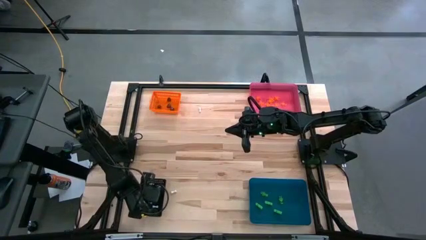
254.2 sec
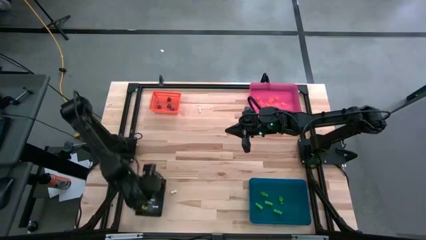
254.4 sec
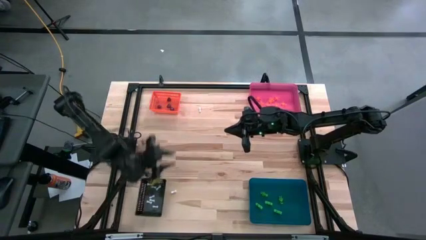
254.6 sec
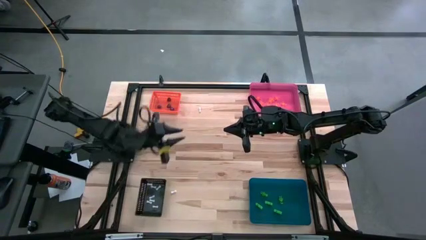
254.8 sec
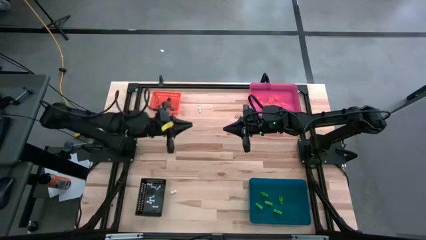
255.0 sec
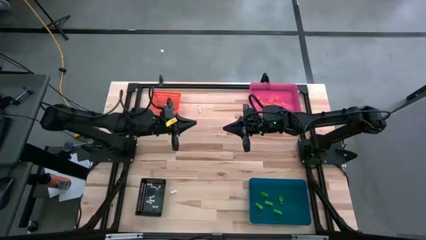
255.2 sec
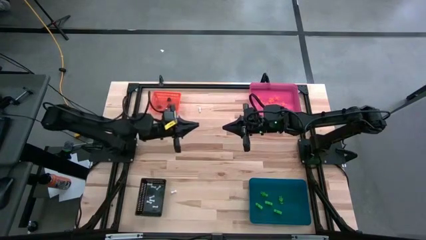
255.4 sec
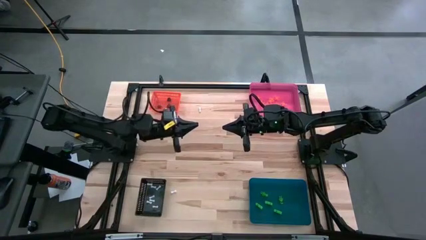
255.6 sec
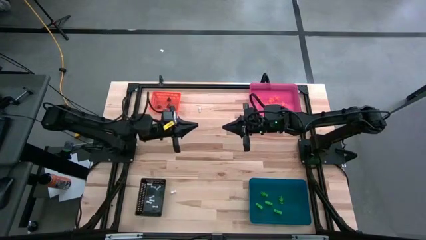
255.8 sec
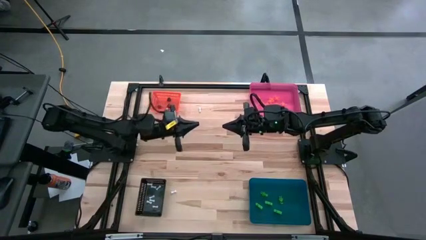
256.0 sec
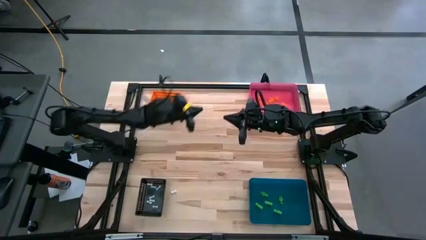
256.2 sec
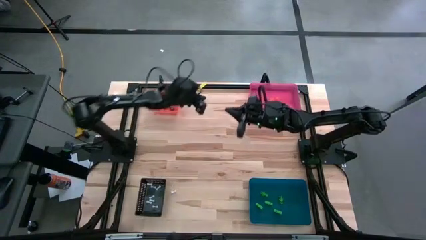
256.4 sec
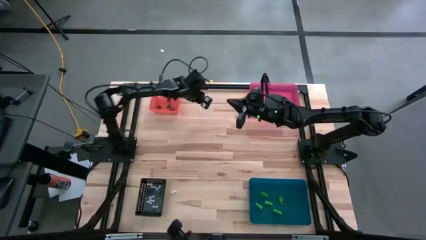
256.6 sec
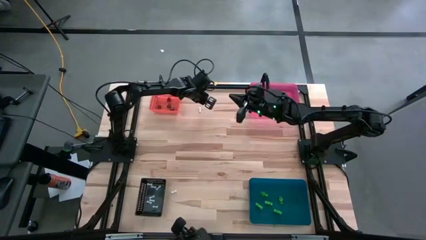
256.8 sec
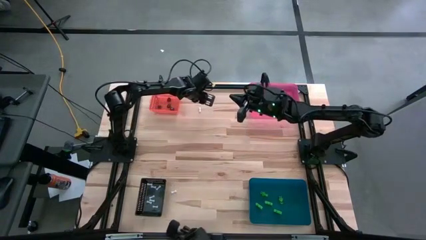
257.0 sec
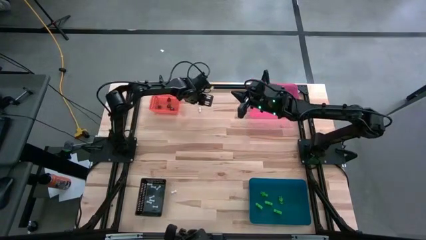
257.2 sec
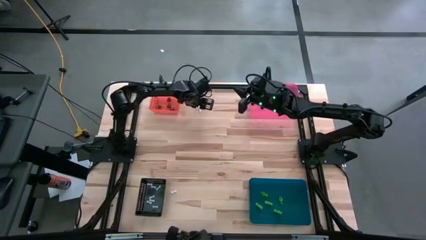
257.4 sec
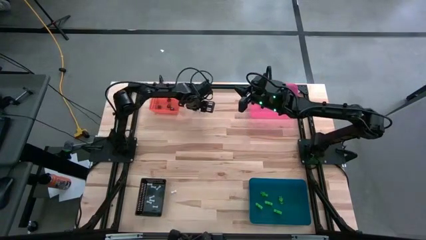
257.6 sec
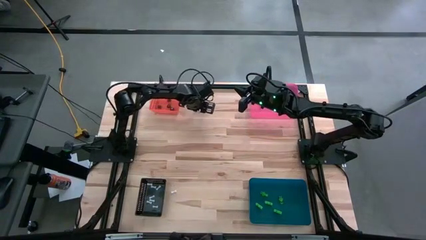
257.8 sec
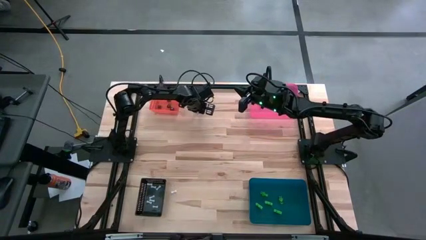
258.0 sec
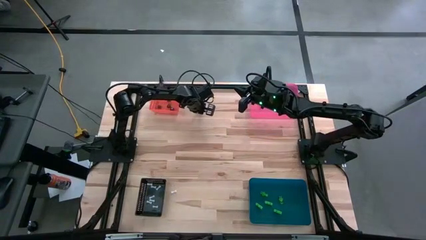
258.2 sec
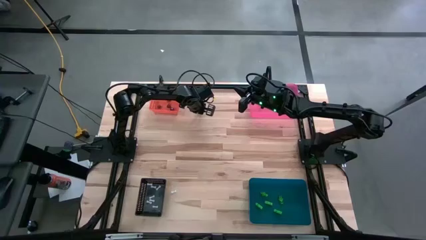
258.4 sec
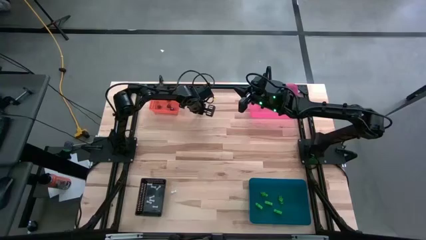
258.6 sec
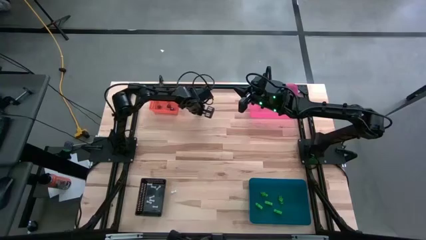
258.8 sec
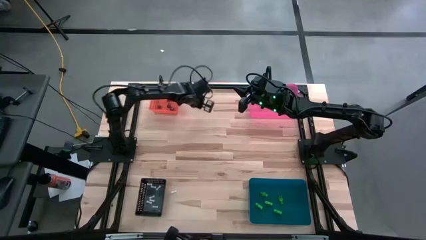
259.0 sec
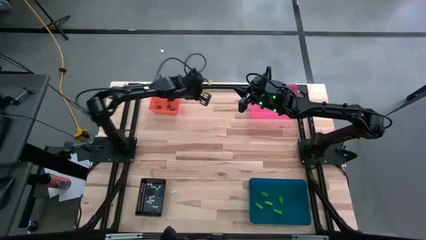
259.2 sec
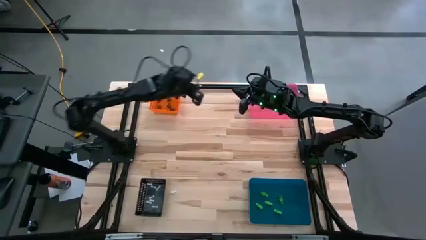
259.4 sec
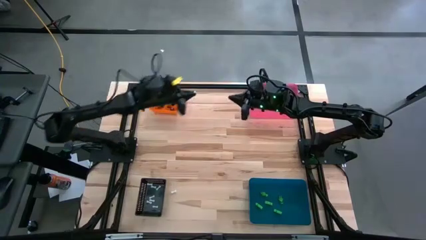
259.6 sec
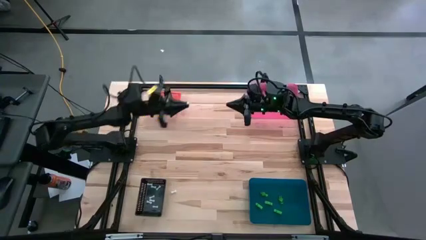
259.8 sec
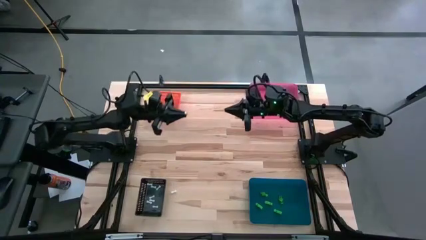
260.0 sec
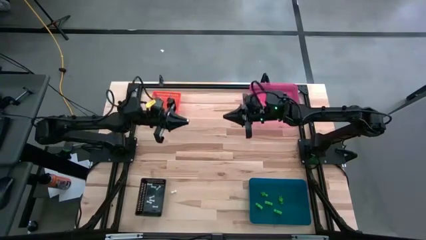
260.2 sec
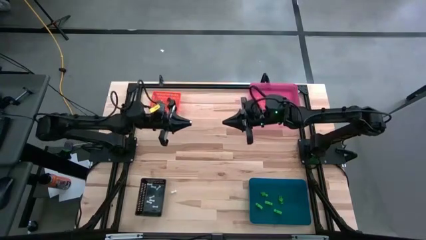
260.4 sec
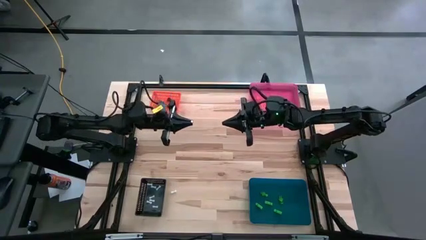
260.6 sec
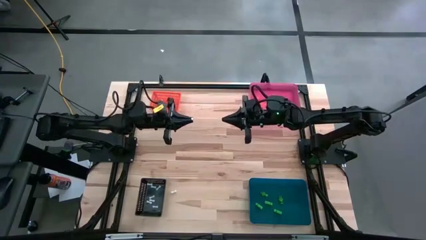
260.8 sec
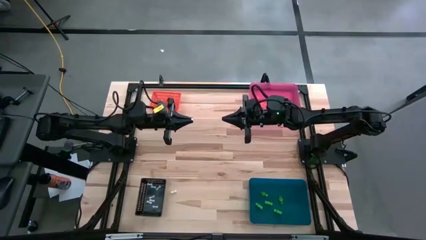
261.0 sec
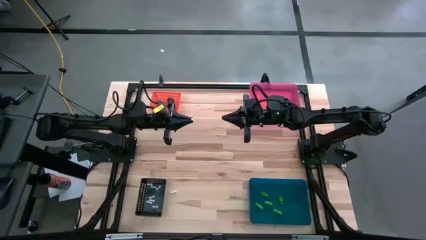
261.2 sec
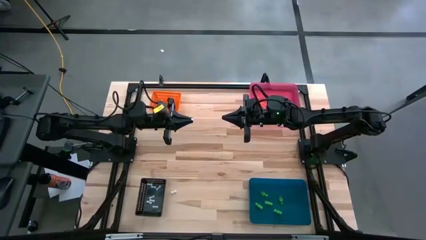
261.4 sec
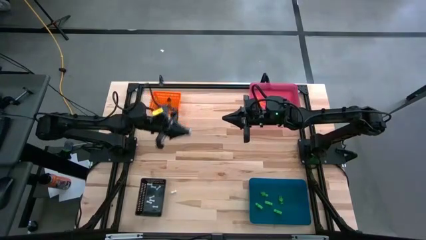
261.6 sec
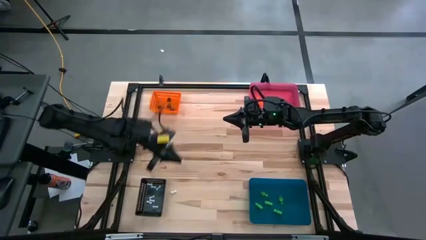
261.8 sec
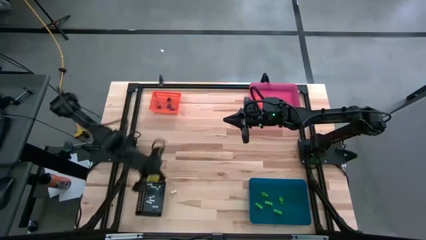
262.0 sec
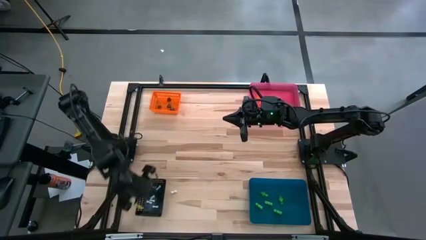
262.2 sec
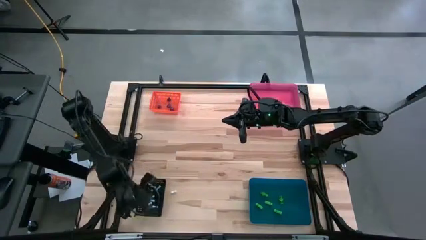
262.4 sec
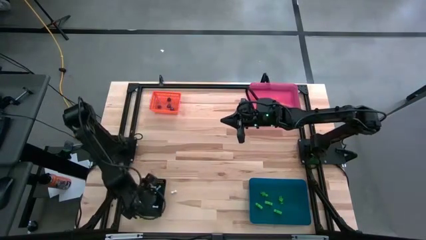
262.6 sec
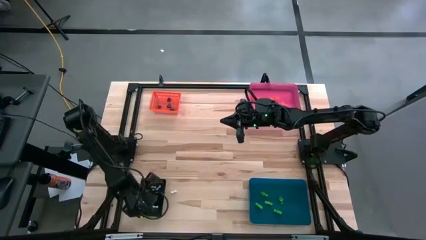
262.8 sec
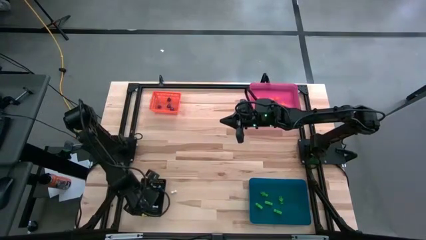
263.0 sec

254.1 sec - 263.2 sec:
Task: Sort Halloween decoration
Put the top white bone toy into the black bin

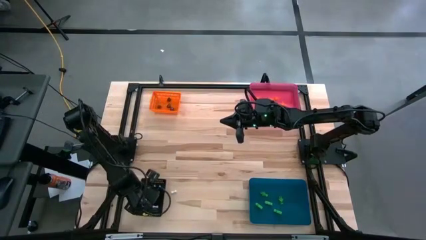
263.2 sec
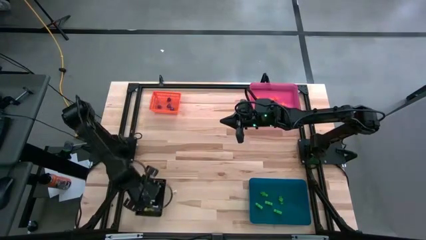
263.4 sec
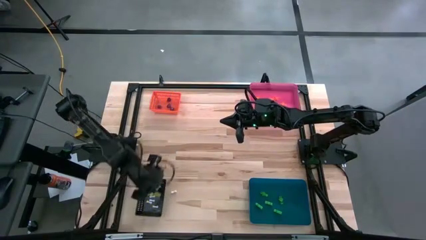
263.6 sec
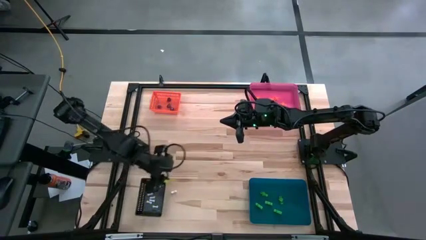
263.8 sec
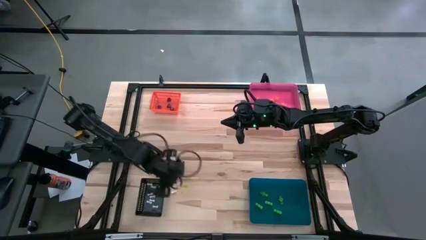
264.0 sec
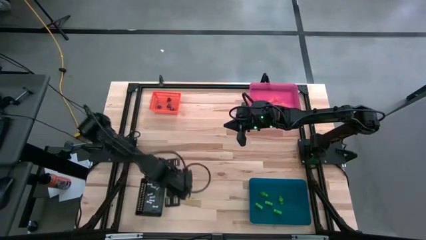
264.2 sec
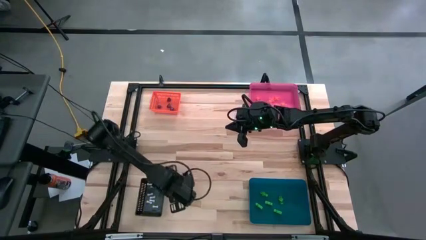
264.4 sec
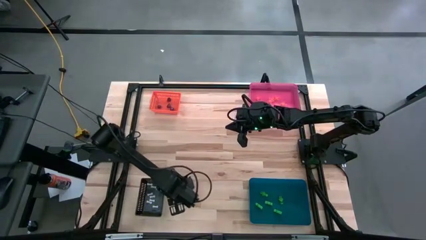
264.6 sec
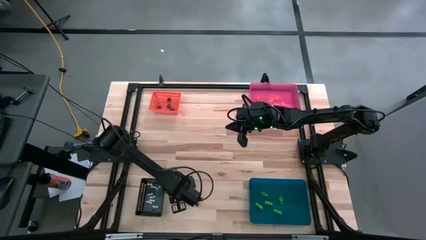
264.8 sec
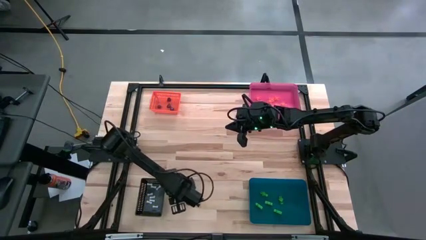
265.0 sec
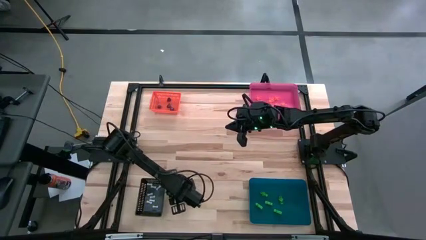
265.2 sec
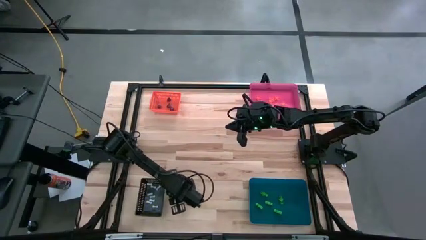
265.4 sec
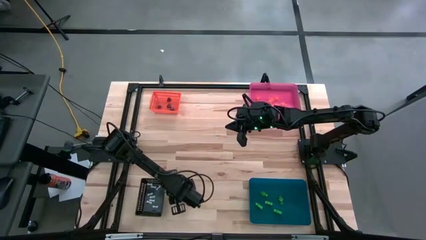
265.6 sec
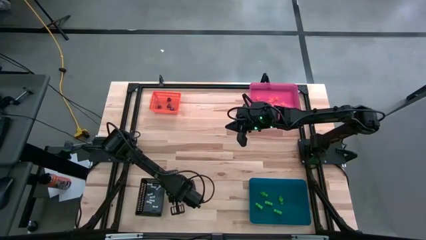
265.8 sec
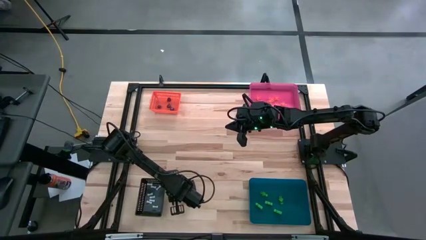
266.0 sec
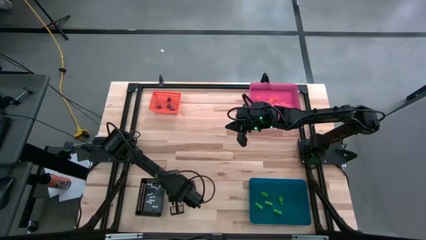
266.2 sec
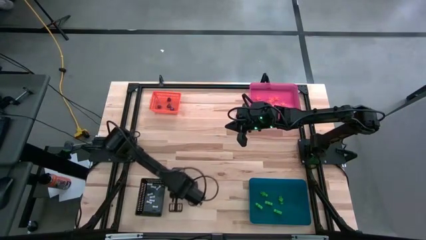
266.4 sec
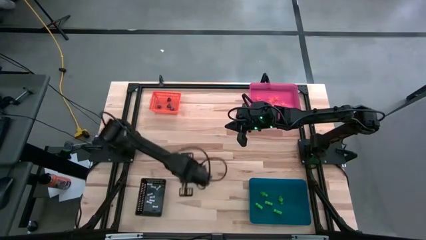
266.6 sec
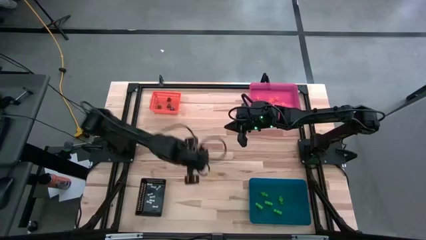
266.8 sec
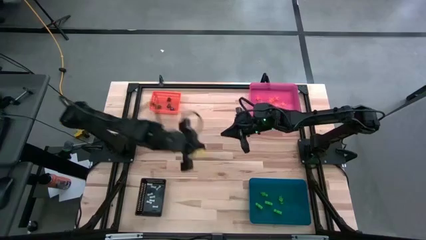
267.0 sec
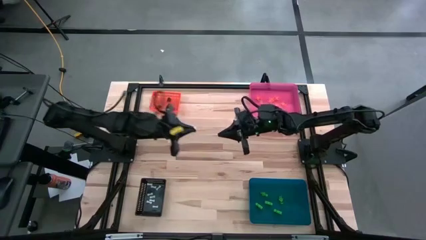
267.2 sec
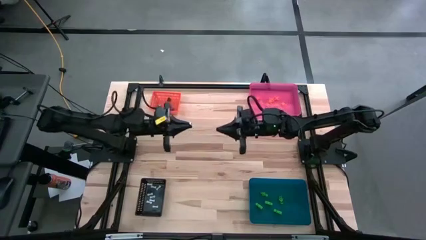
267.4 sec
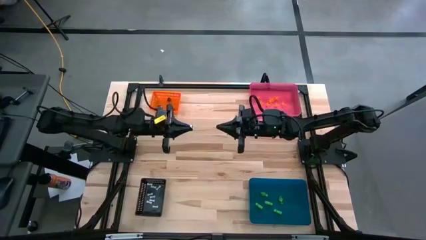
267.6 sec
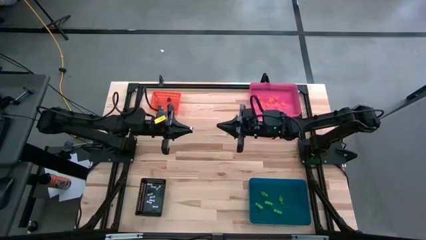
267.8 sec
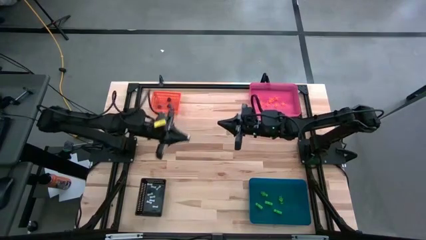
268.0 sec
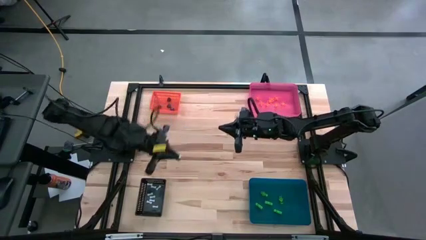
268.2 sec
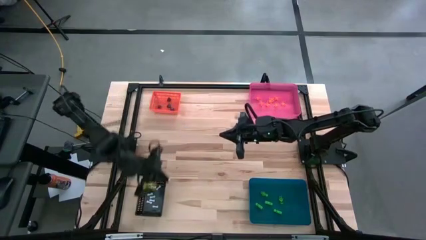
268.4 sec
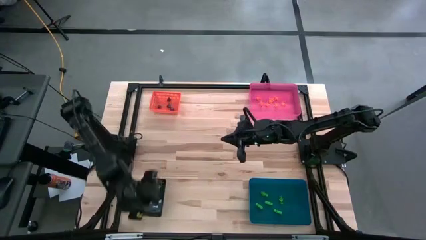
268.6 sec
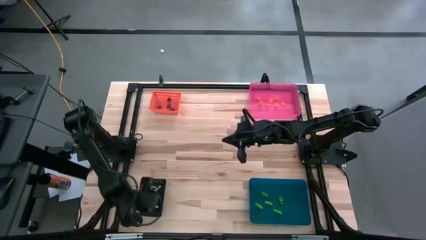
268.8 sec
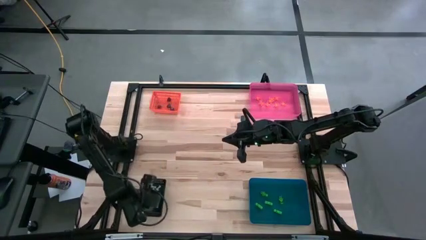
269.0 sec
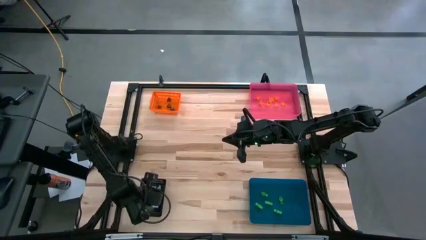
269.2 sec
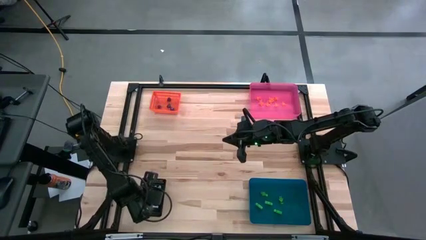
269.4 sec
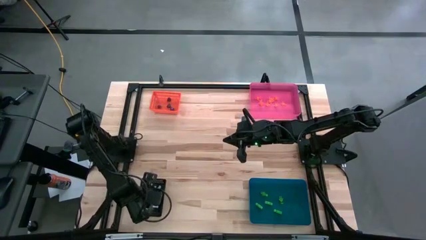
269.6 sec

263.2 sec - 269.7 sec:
Put the white bone toy into the black bin

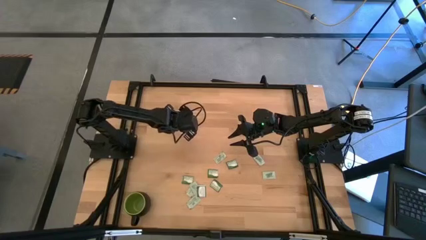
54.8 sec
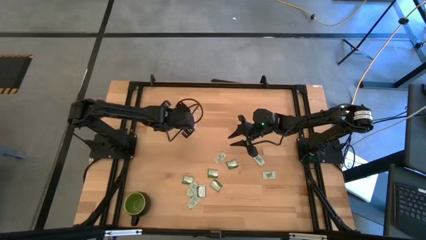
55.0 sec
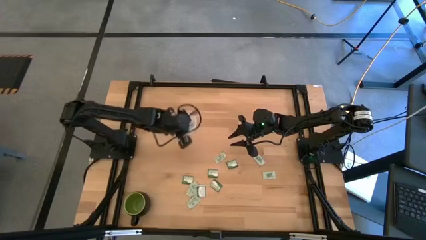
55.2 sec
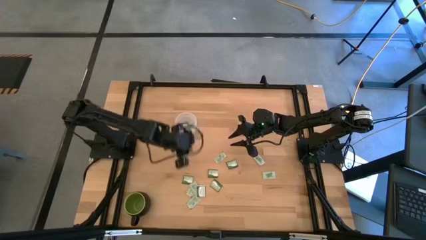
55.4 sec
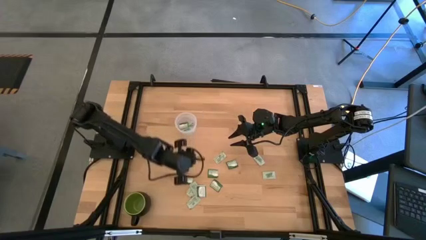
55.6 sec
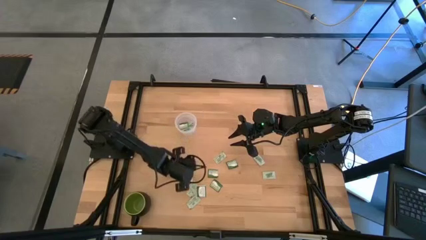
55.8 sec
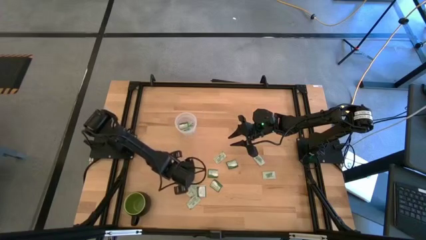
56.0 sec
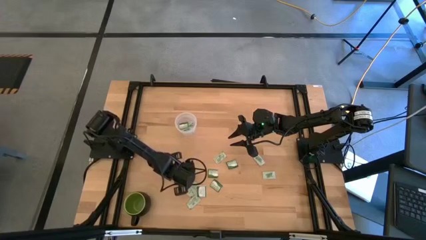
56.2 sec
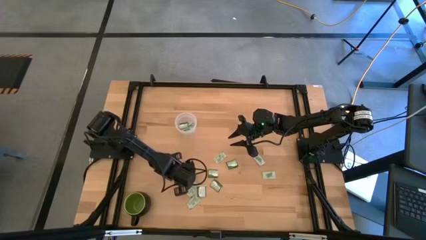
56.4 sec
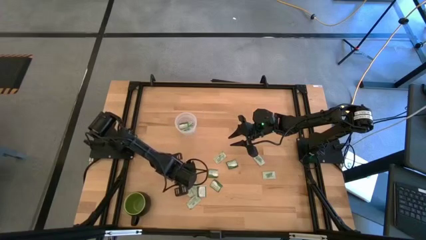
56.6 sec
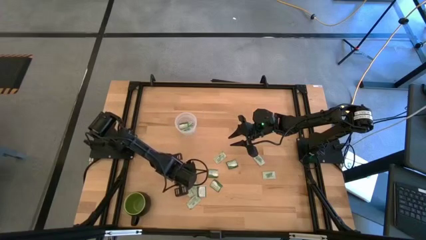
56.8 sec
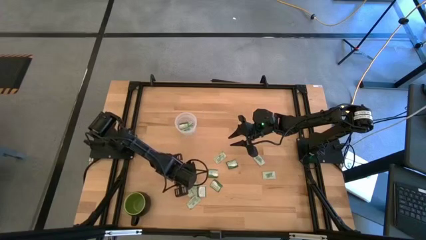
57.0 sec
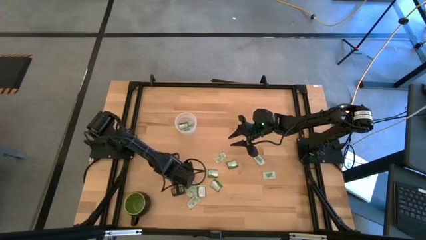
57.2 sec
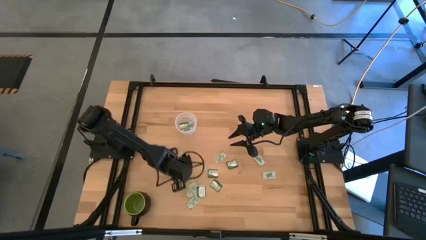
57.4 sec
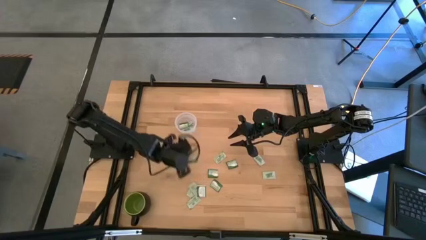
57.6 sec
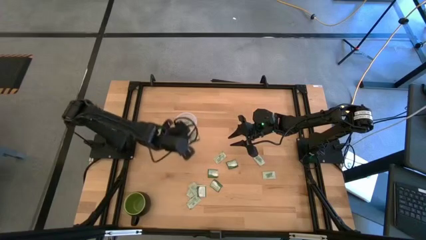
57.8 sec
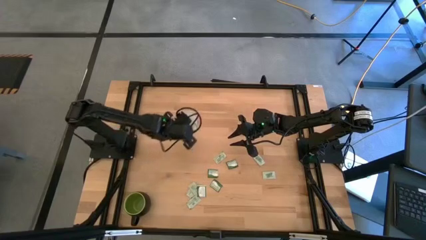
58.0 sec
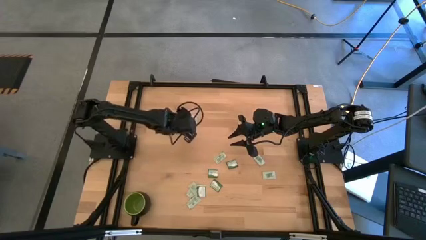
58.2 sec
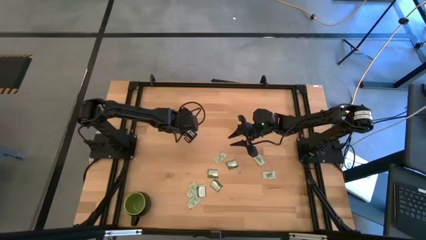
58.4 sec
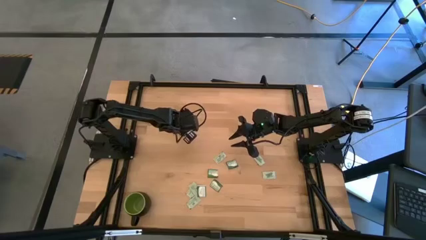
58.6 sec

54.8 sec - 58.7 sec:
Task: Pick and place Stevia / Truvia into bins
Put the green stevia packet into the transparent container
